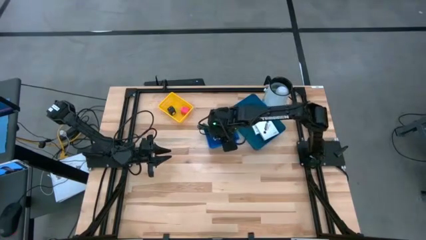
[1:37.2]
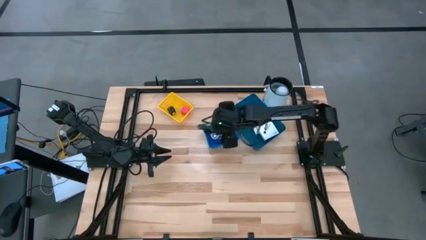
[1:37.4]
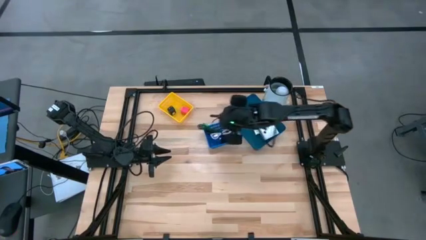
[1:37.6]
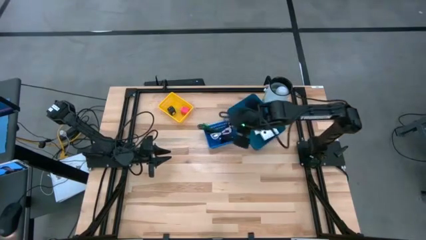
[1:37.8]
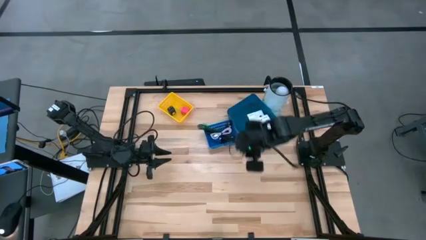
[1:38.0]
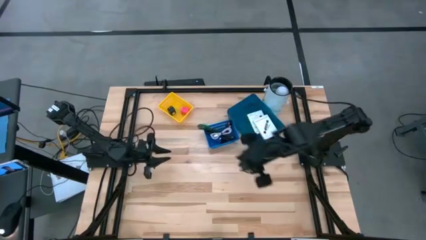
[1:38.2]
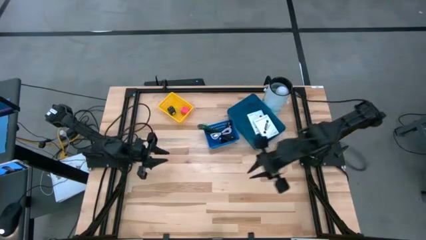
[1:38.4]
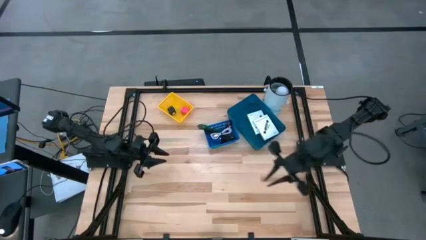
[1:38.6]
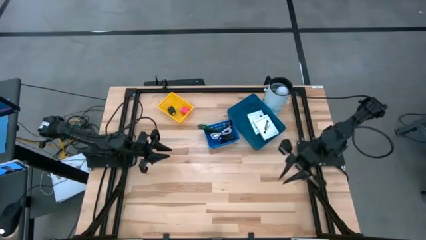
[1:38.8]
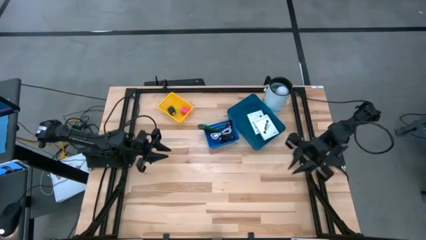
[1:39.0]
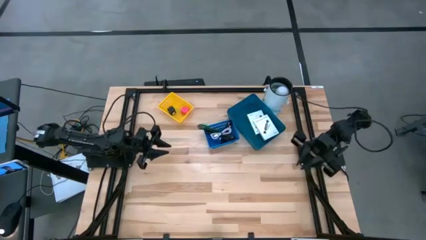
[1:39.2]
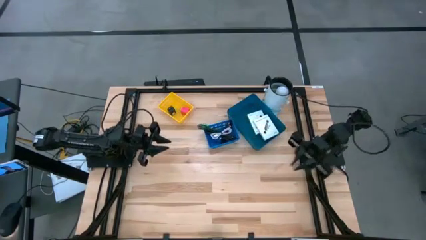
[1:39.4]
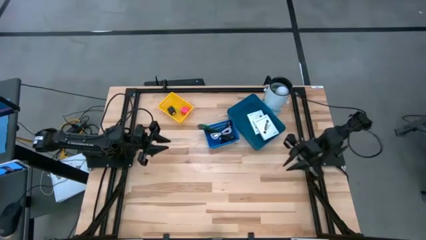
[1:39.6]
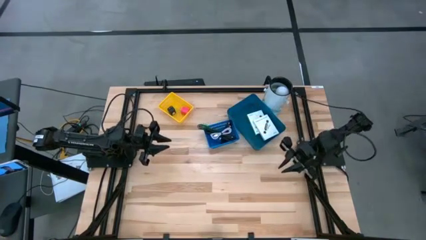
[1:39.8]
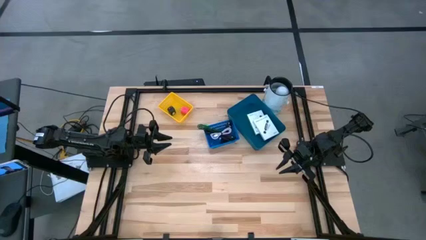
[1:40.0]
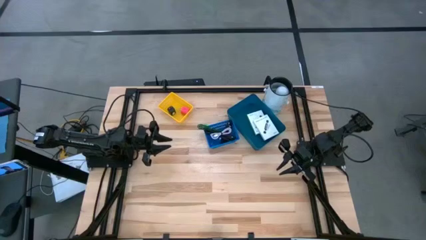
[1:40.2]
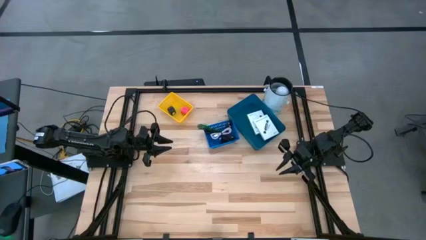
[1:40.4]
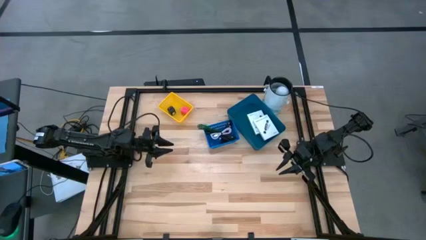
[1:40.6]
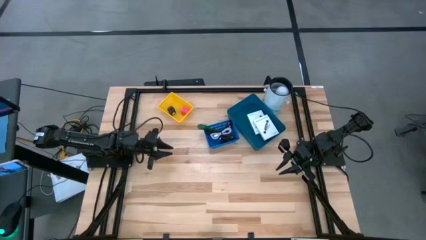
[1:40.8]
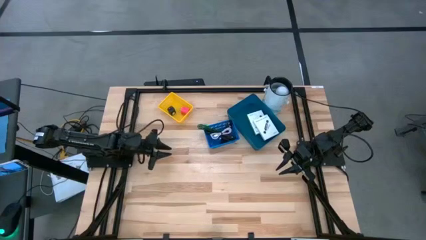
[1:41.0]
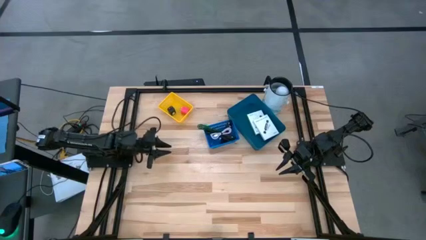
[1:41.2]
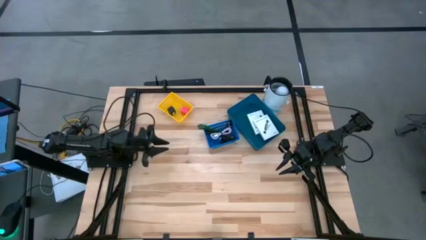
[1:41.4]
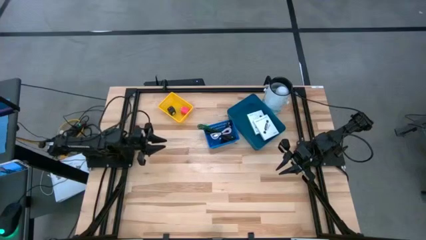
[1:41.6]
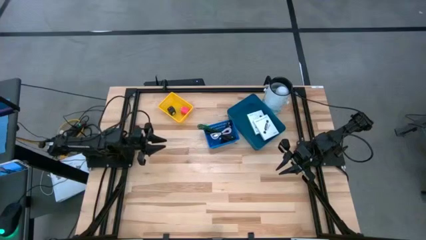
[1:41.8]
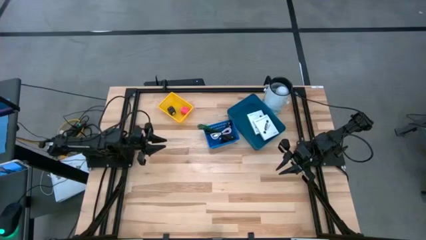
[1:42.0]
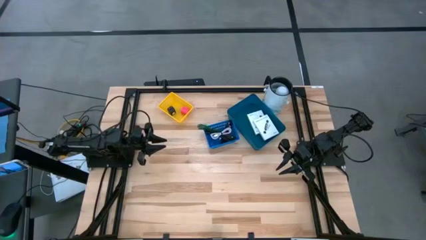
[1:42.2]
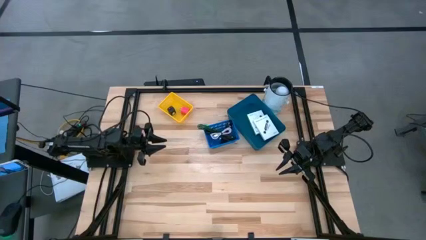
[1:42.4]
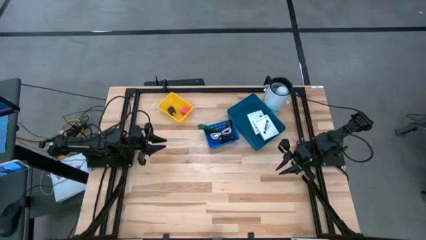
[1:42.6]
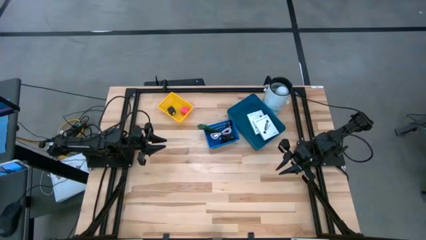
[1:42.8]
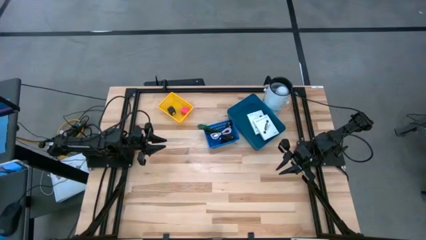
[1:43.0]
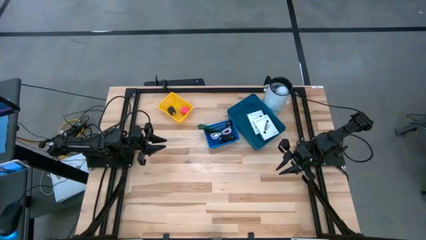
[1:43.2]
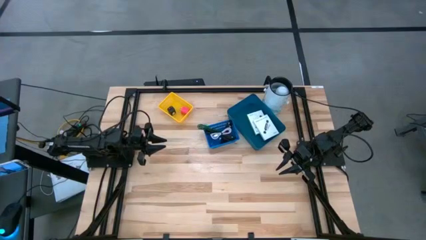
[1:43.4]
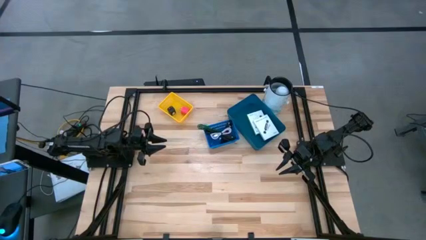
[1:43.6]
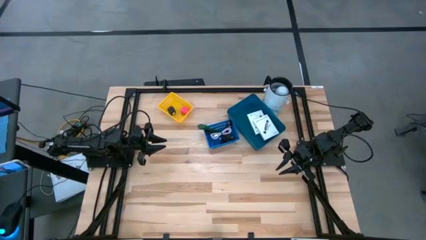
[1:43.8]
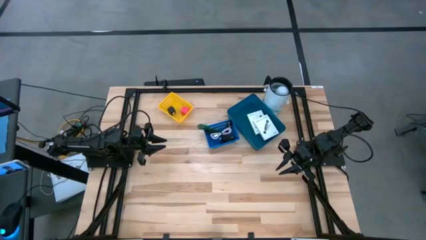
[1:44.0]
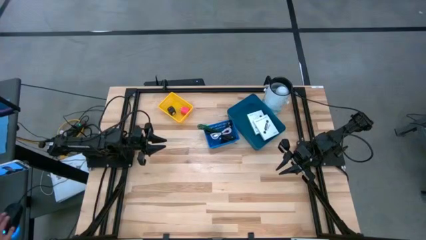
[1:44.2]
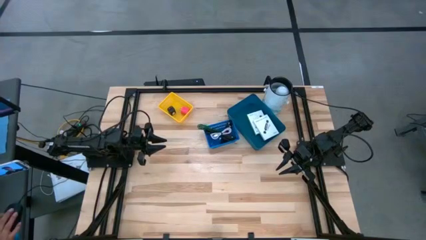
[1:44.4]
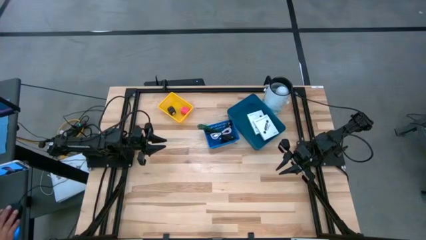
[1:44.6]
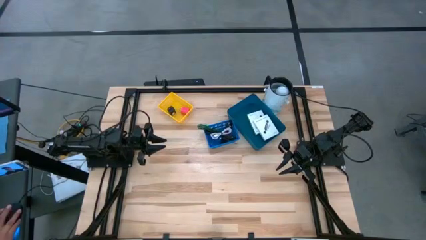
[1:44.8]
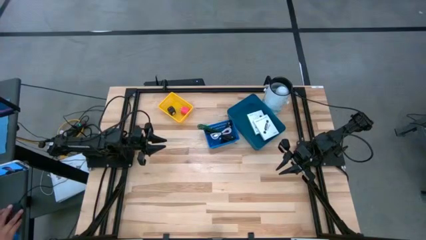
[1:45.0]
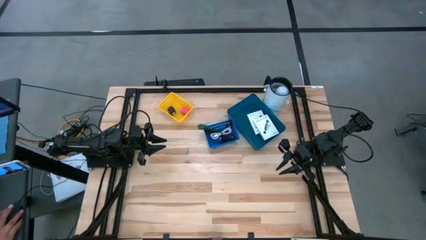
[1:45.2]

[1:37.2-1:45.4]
Task: Pick and place items into bin
Return to Home Position

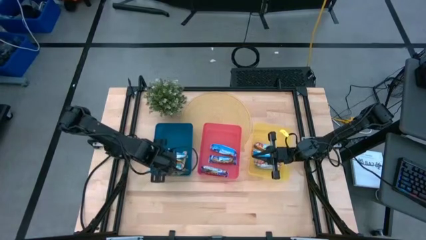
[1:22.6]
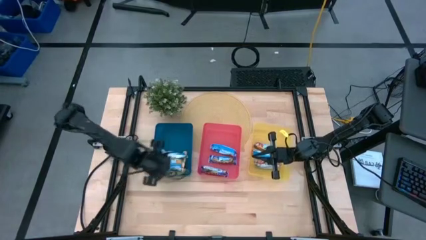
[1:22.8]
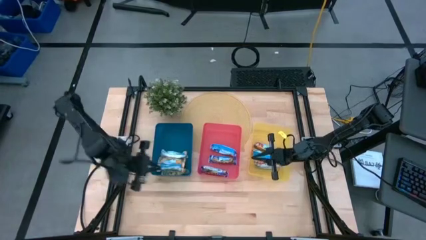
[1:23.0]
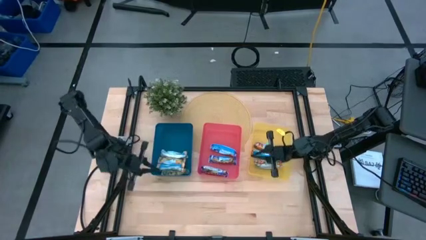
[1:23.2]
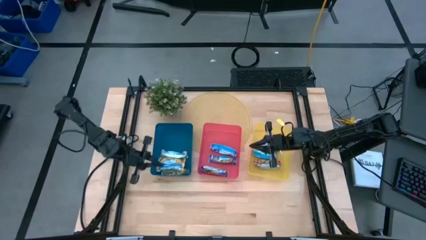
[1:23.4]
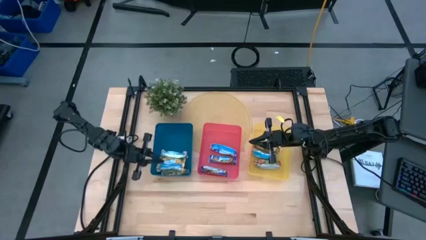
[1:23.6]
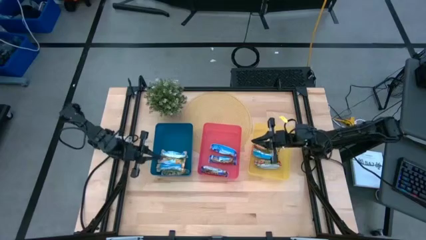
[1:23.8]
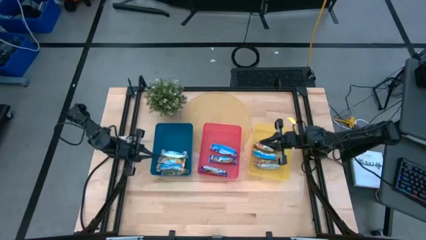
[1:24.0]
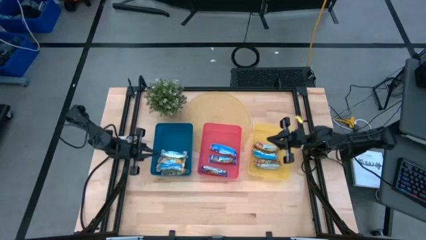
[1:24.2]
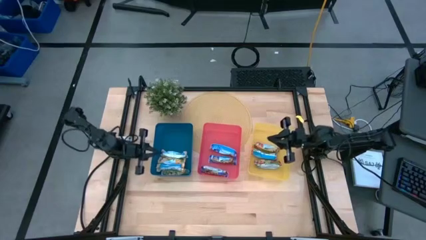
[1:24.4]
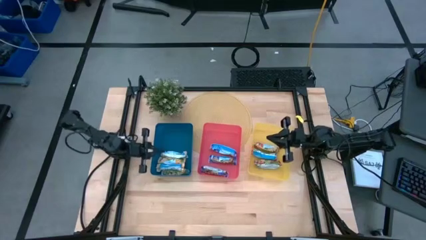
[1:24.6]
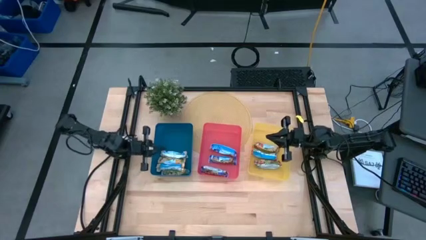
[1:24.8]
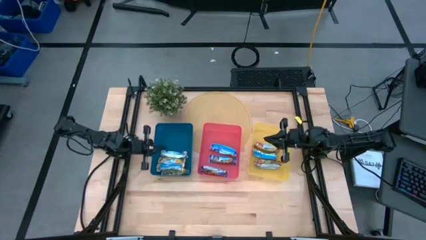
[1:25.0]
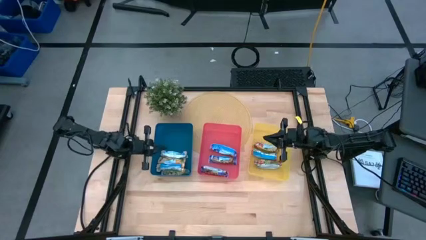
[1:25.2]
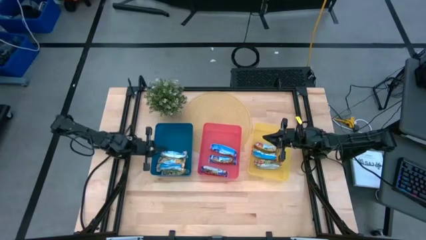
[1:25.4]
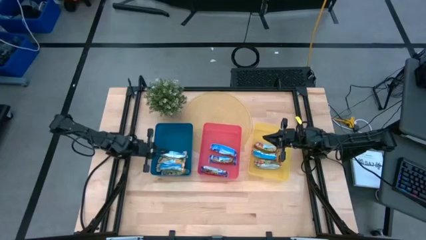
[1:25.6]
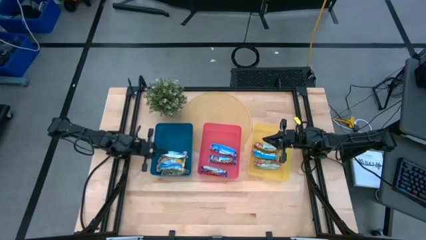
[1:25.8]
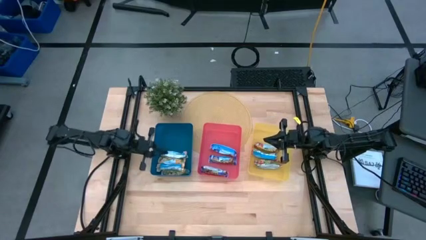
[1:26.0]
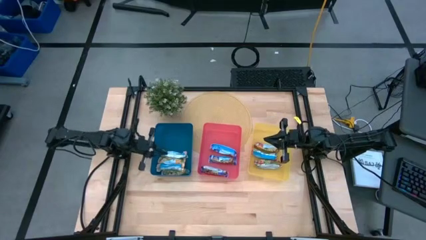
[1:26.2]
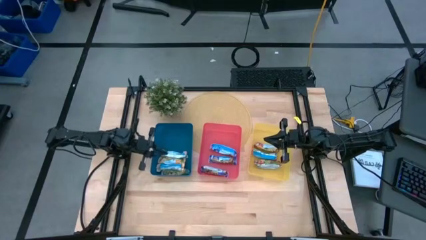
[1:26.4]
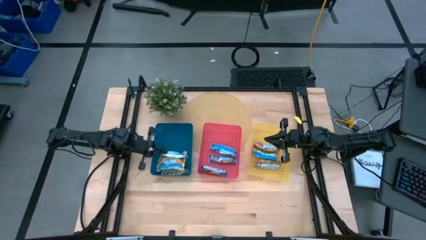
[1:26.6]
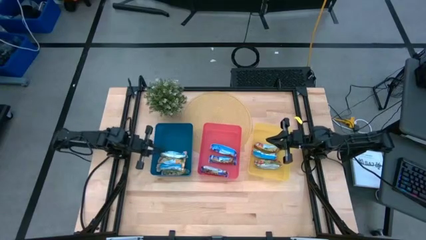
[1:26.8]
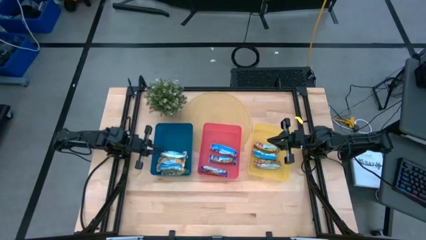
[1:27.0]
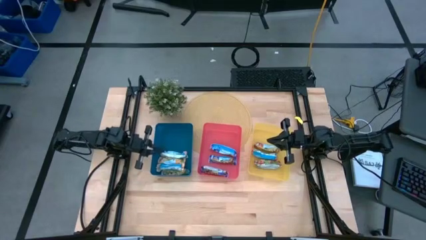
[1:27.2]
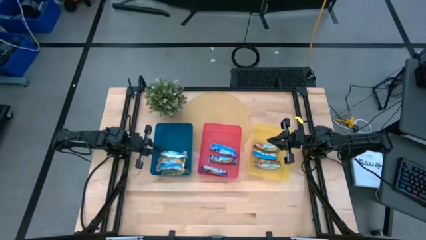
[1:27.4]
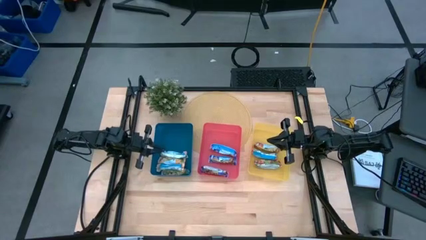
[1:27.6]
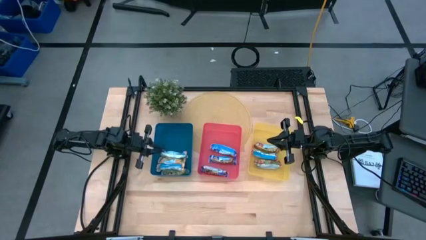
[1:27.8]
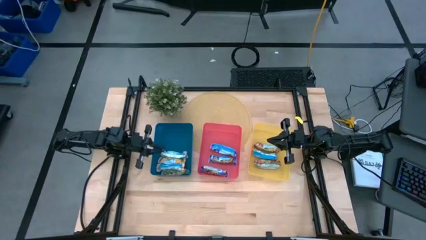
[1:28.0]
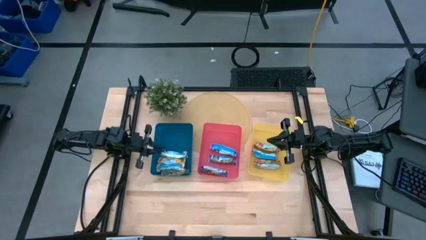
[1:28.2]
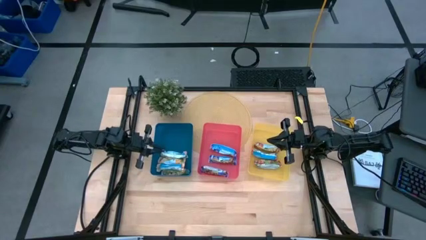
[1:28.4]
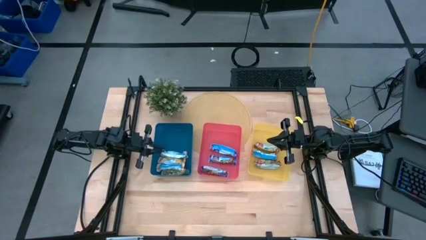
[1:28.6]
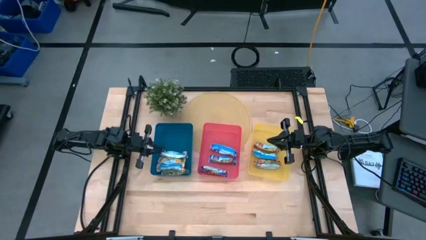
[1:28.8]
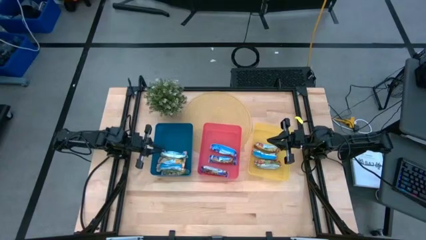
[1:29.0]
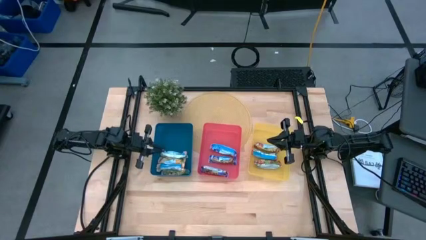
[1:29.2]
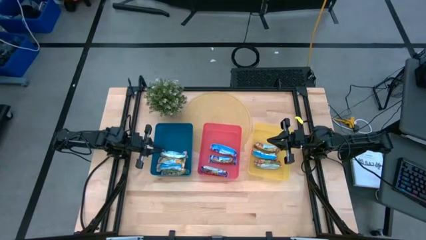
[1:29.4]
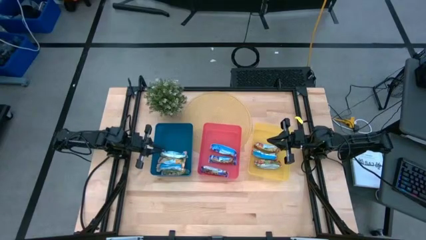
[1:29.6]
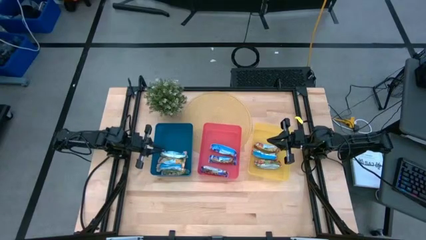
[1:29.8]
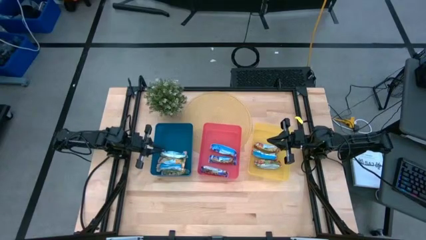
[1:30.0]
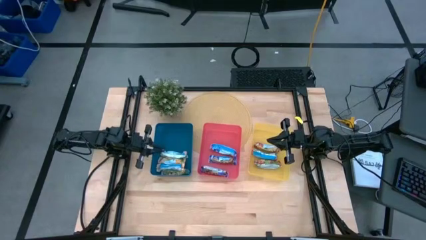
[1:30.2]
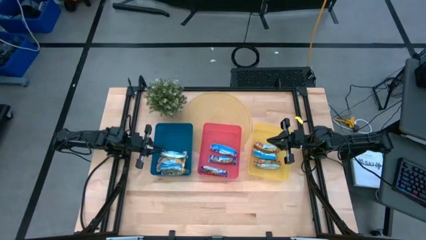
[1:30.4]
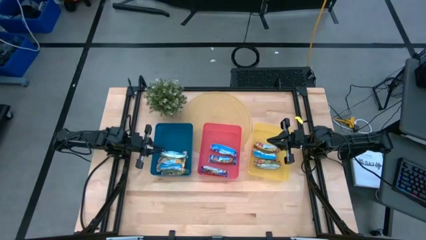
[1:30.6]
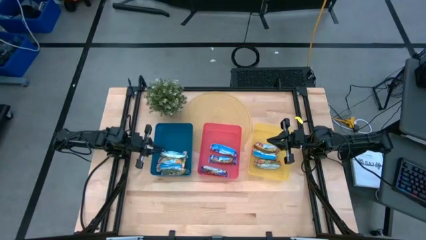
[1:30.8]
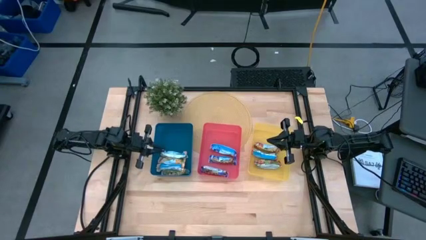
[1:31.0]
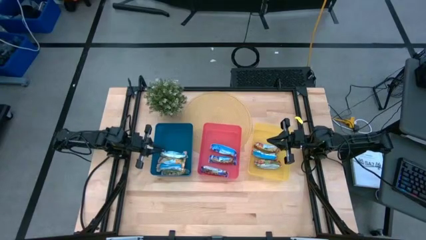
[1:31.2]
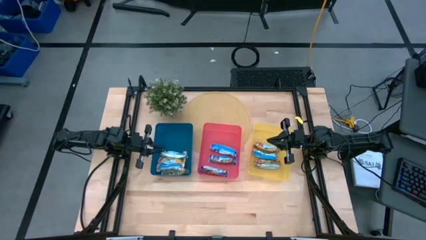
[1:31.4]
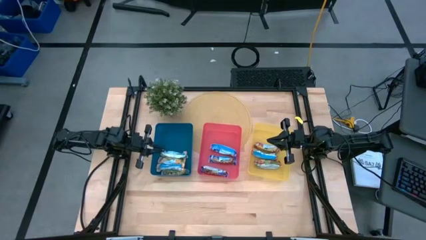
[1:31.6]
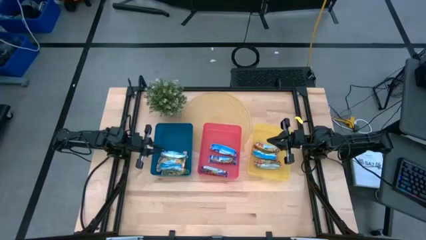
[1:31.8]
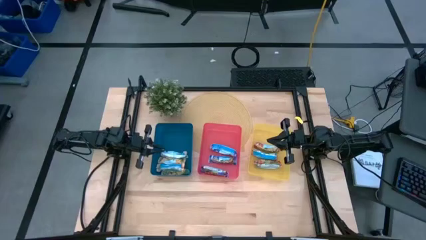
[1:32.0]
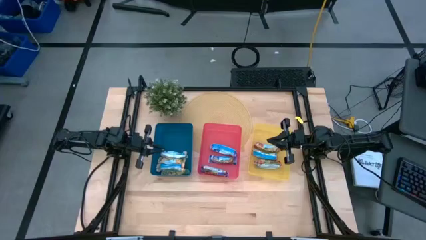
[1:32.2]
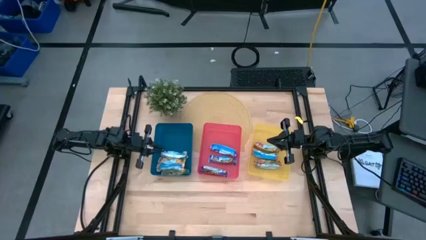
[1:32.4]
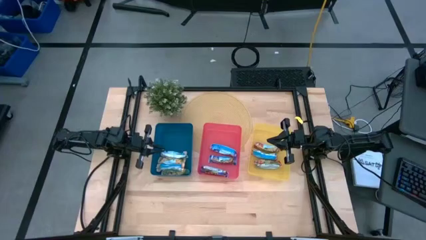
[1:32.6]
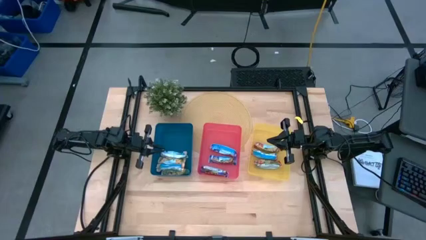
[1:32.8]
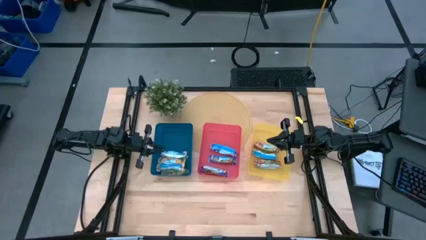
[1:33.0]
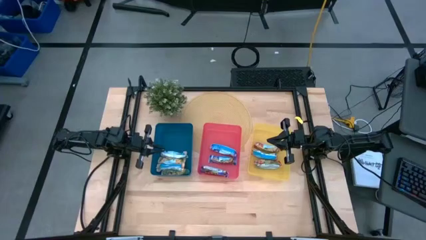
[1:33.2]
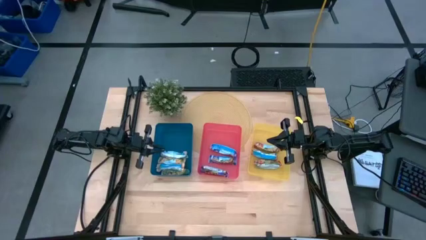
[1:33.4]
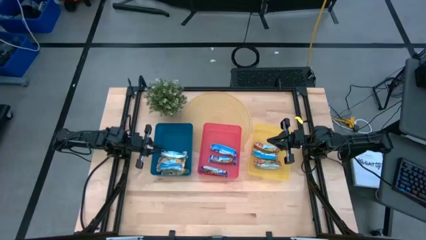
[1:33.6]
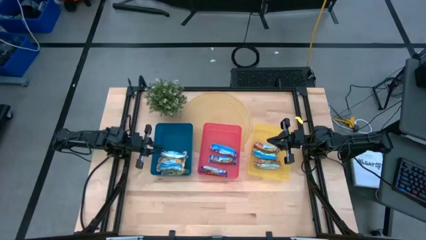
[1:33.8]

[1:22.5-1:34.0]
Task: Pick and place Granola Bars by type
Return to Home Position
